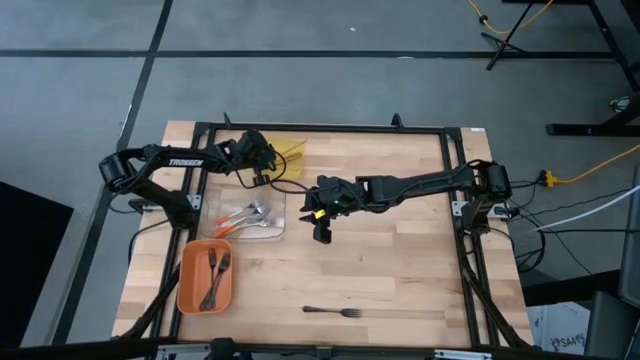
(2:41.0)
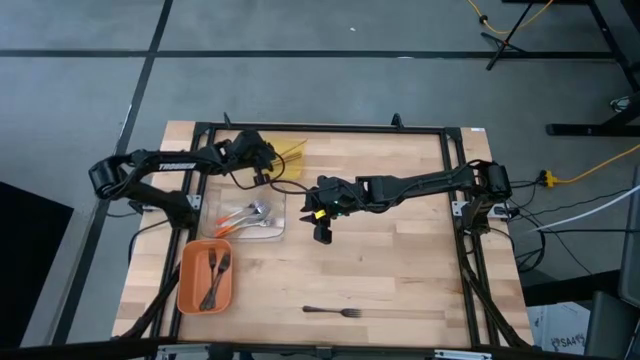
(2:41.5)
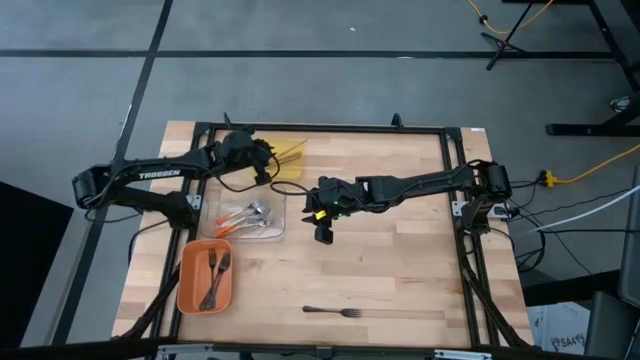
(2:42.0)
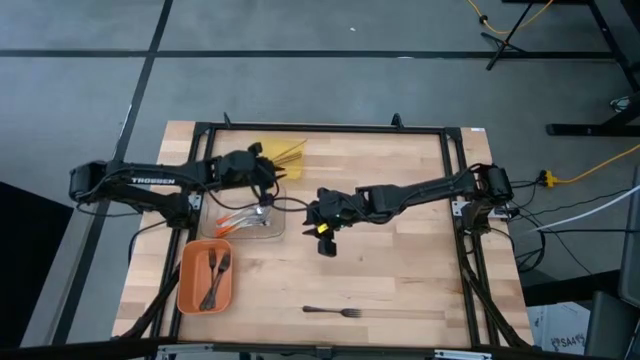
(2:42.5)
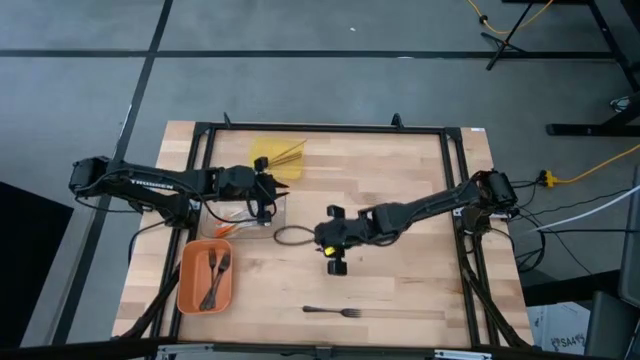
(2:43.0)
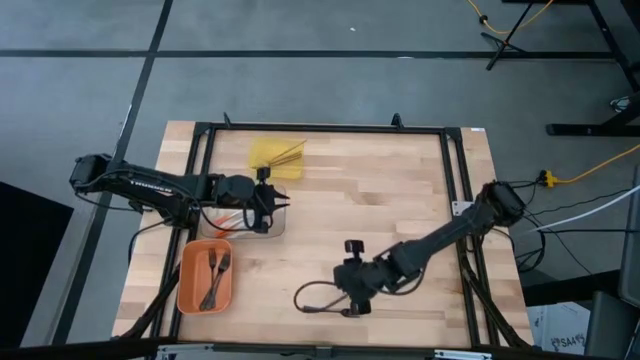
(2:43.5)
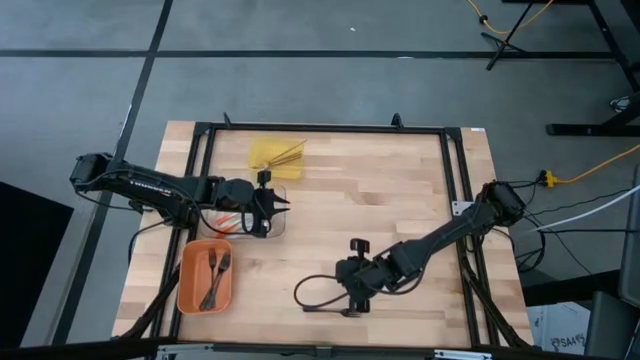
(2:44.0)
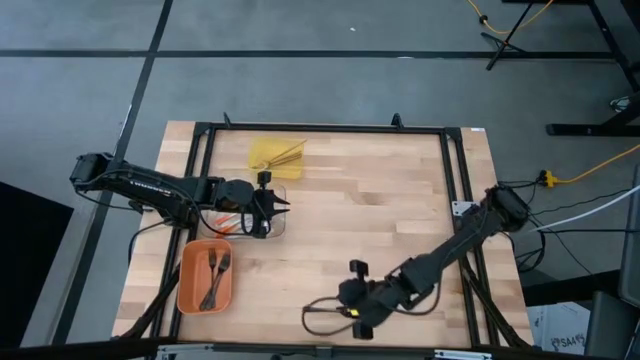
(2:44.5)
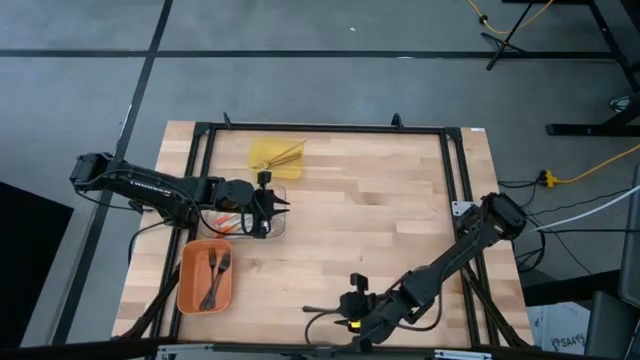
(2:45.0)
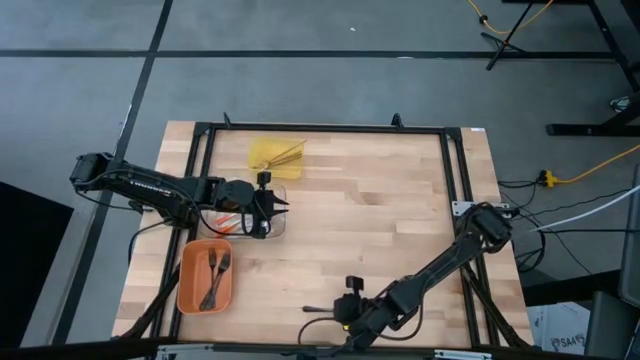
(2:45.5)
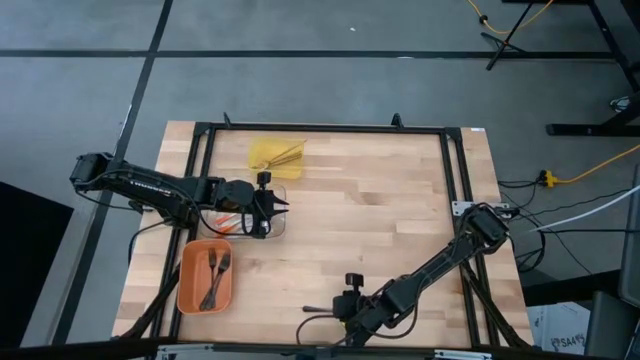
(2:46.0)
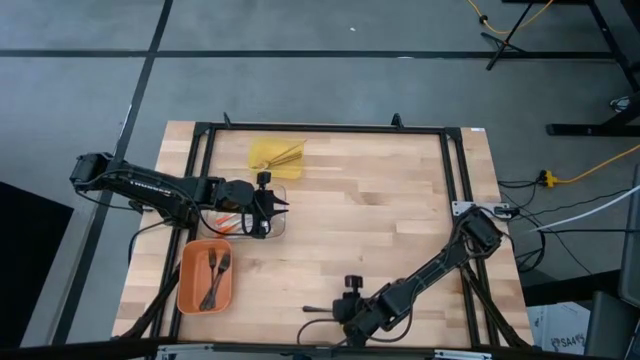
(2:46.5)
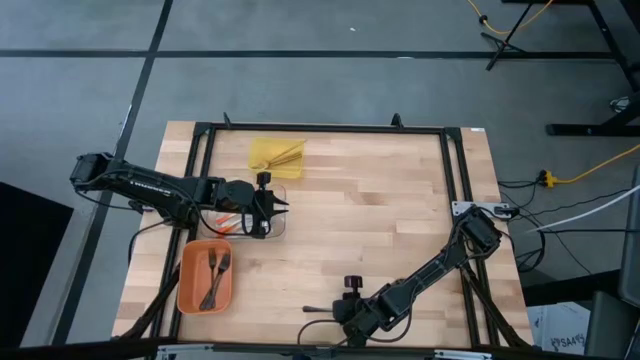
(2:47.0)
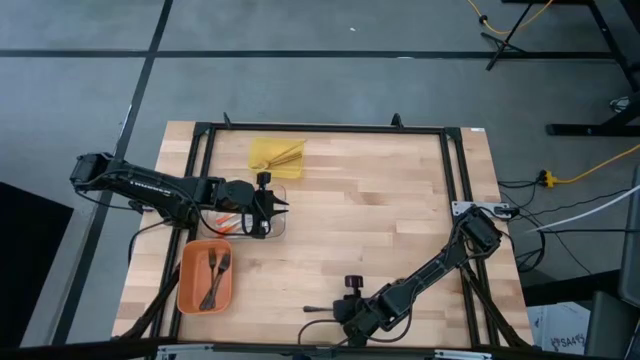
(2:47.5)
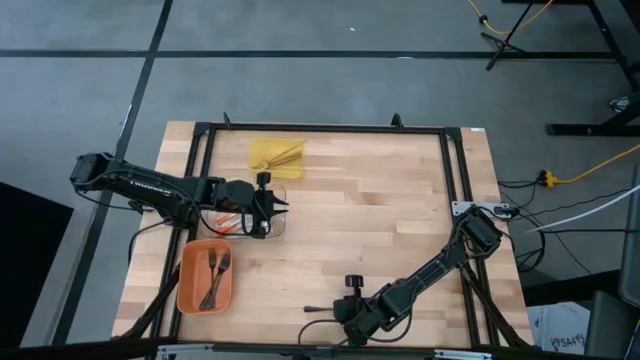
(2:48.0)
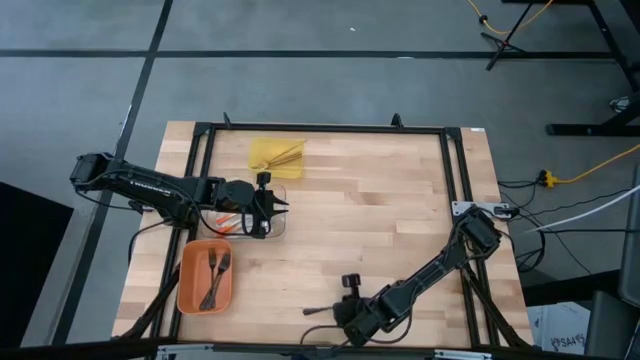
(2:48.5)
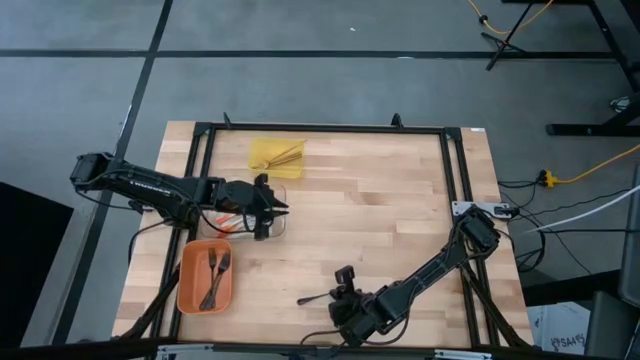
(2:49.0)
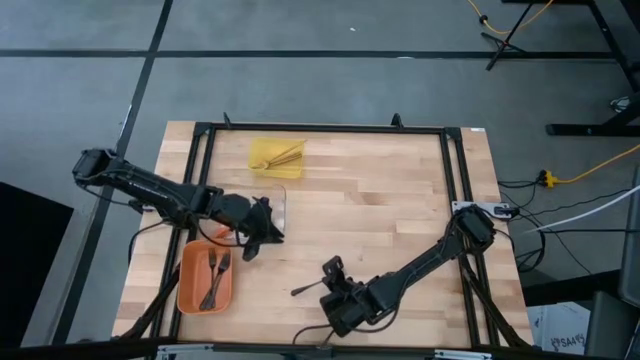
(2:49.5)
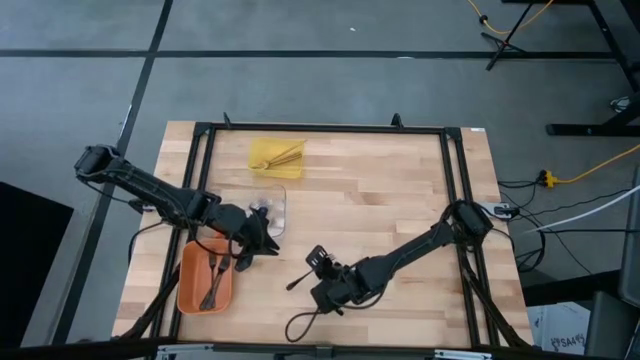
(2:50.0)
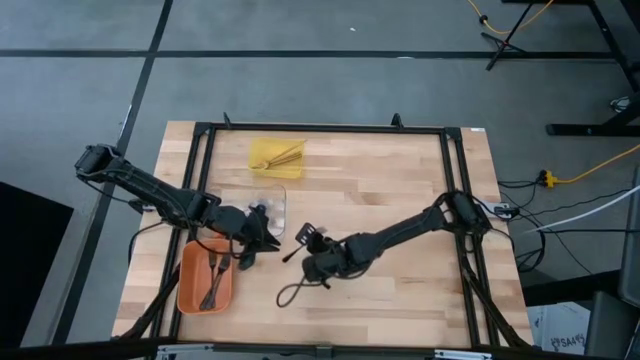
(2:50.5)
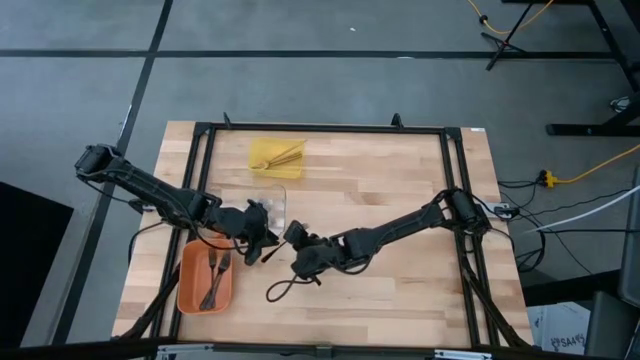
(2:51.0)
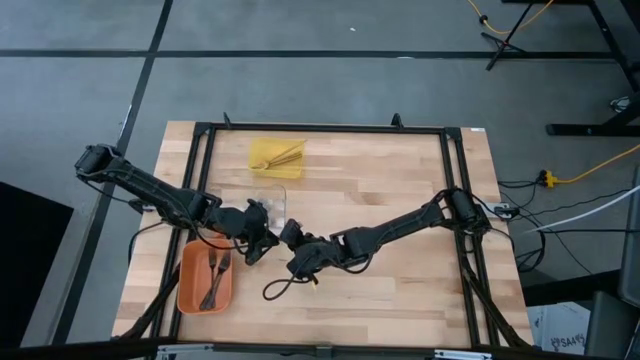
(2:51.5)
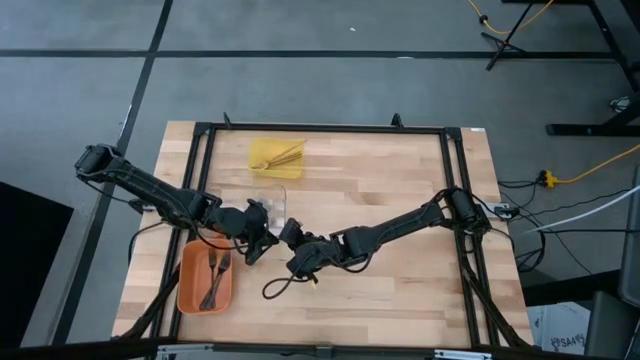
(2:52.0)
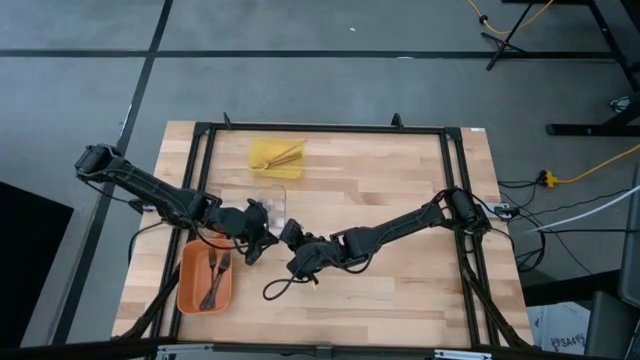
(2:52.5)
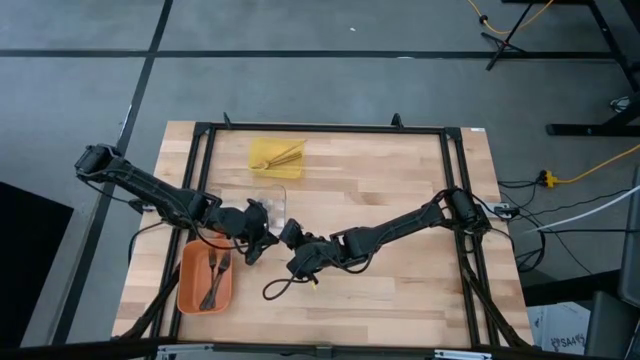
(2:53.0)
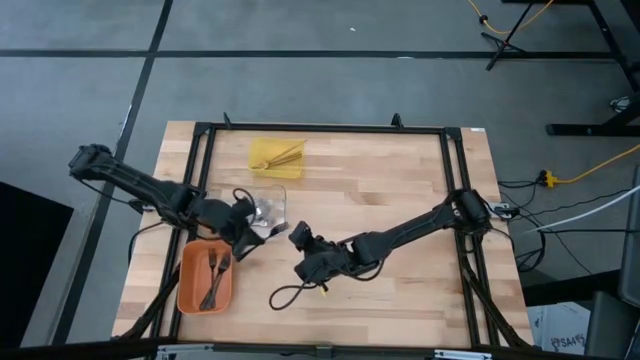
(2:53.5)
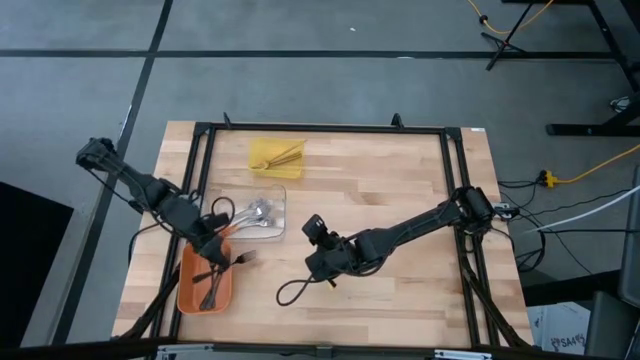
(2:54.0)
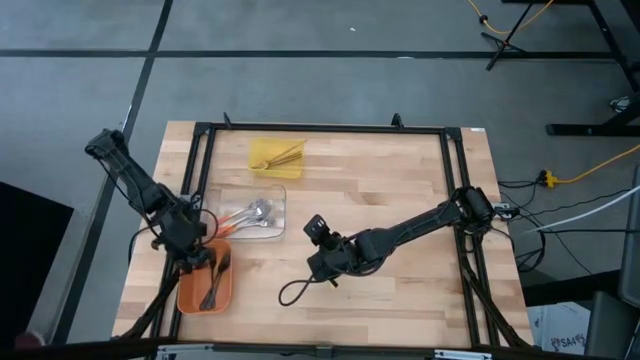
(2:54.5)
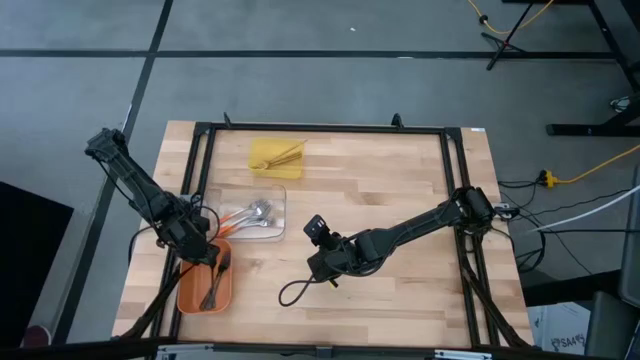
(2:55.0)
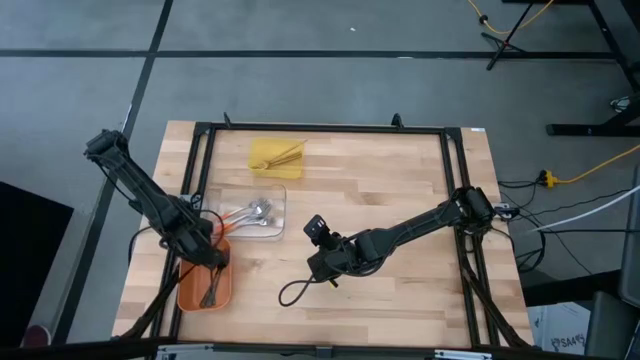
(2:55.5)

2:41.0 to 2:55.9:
Task: Sort silverware by color (type)
Put the black fork into the orange bin

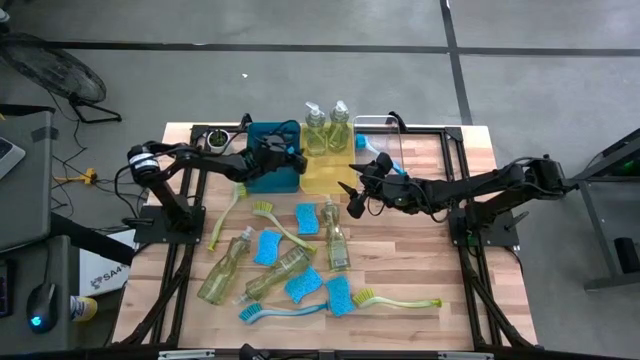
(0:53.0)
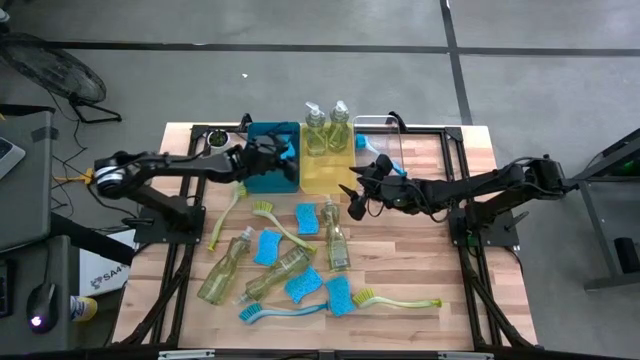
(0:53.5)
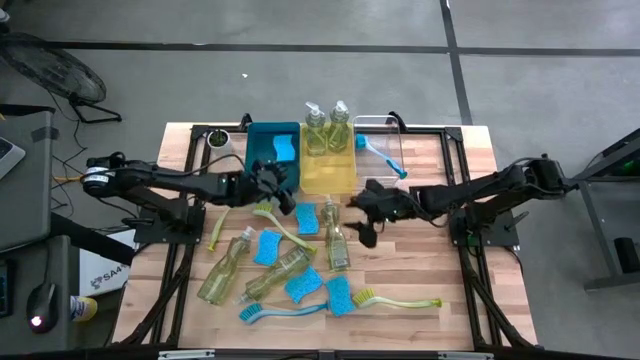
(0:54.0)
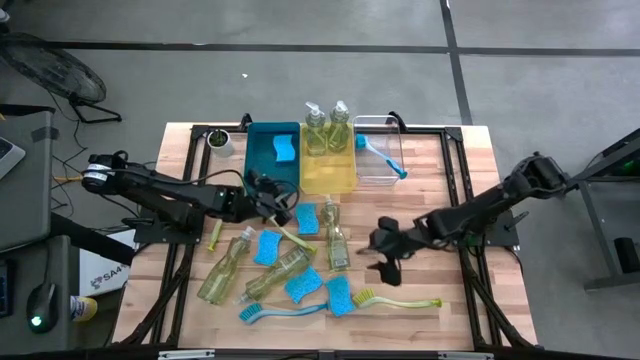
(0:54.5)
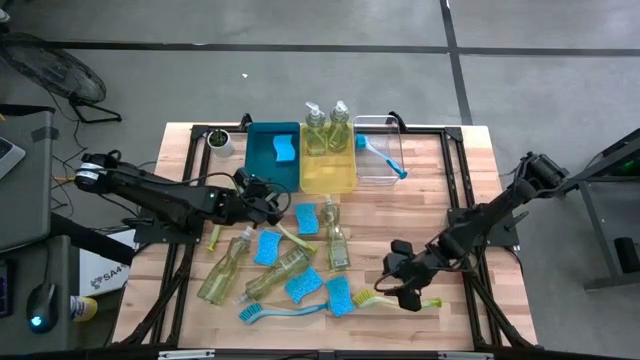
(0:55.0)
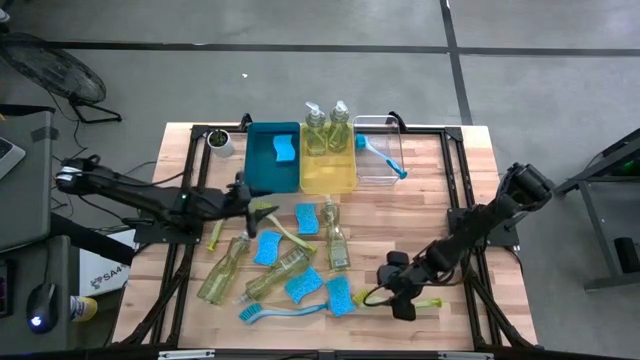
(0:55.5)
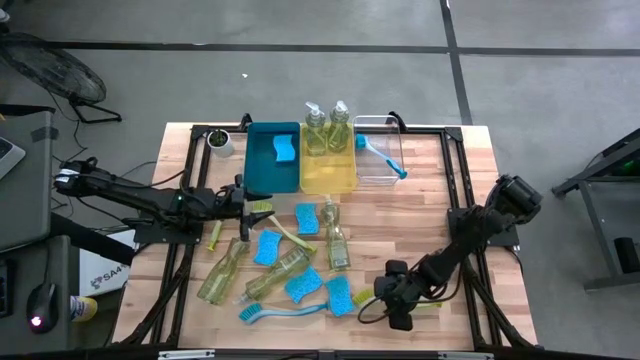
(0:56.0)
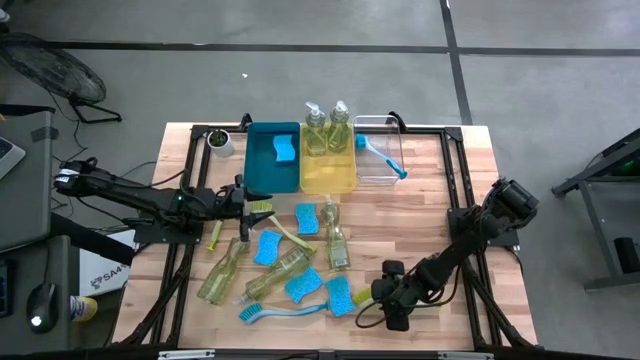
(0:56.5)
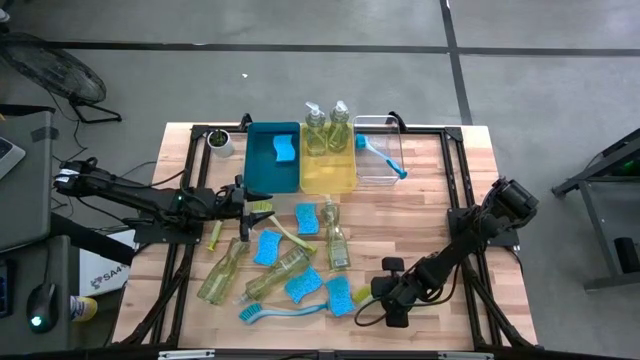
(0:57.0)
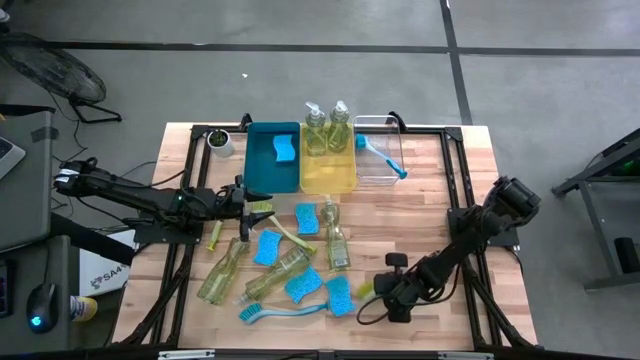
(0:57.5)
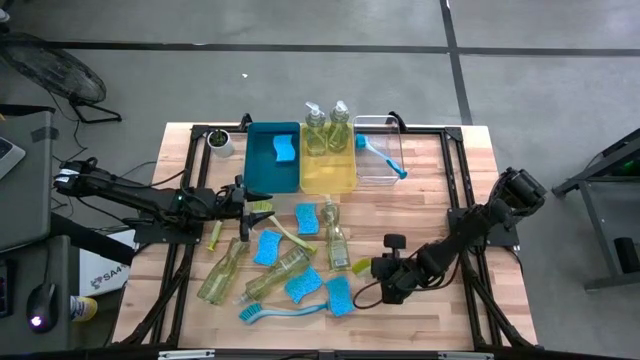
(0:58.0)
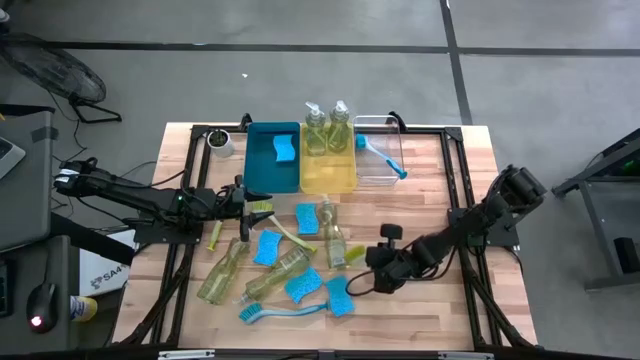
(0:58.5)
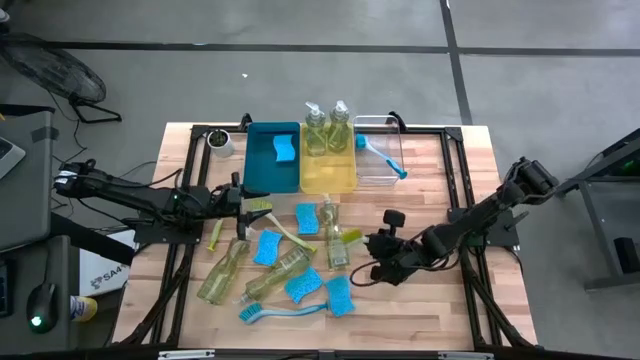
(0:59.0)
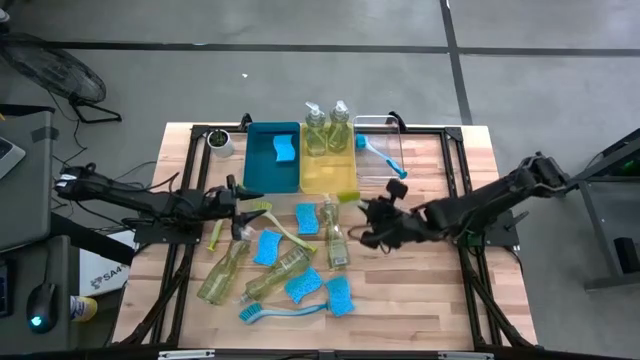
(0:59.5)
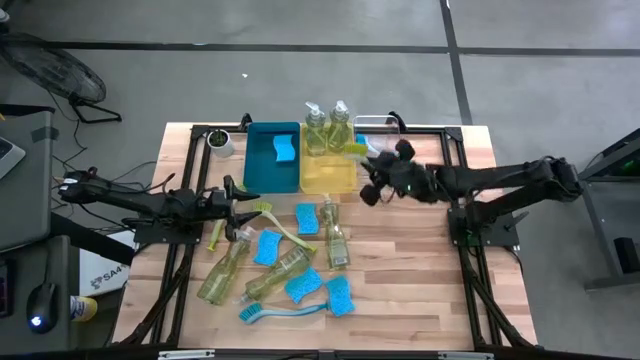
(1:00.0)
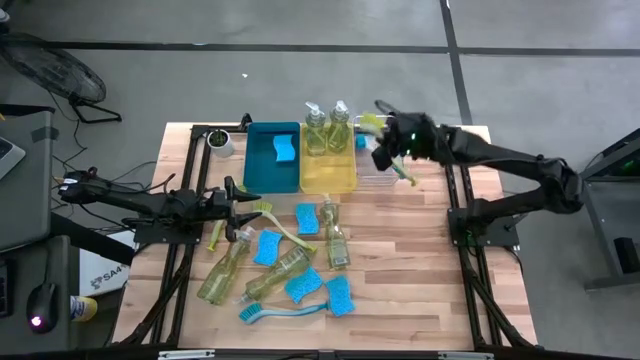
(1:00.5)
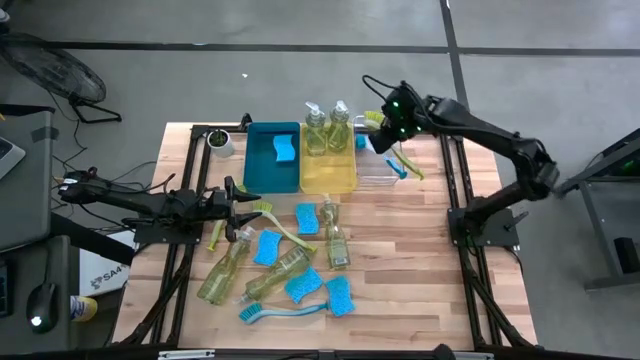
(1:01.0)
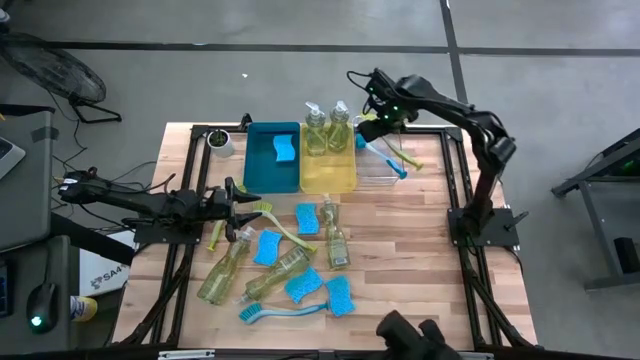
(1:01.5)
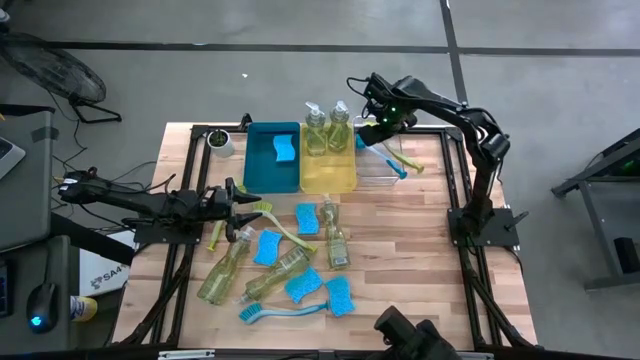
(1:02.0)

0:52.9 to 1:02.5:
Task: Pick & Place Kitchen Sink Supplies
Put the green toilet brush into the transparent bin
